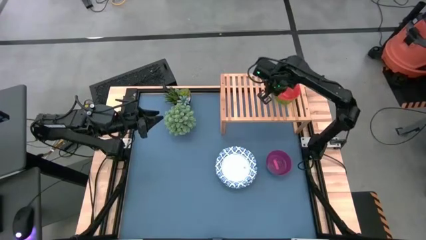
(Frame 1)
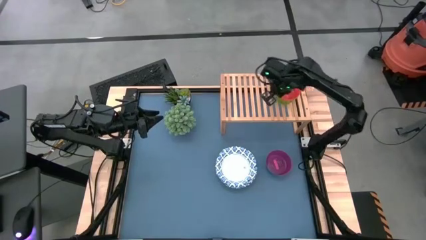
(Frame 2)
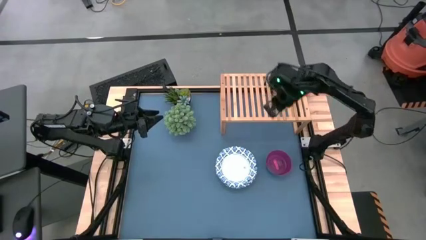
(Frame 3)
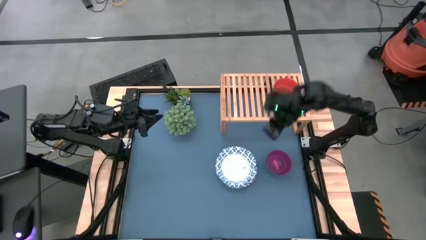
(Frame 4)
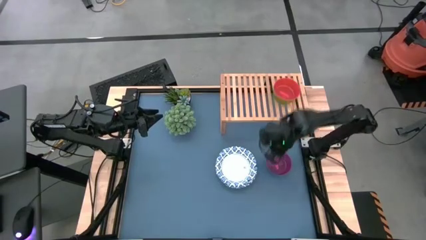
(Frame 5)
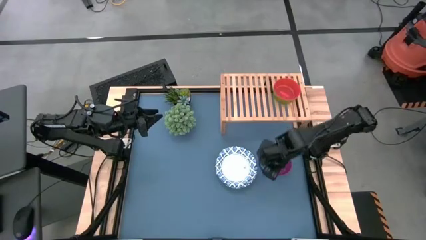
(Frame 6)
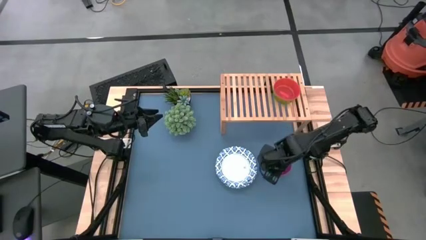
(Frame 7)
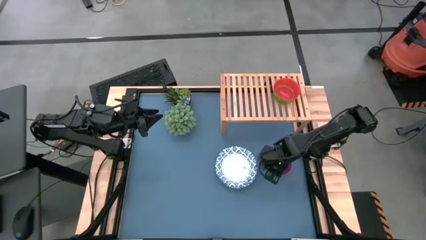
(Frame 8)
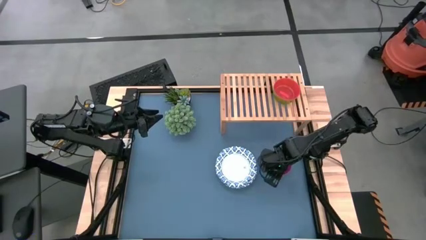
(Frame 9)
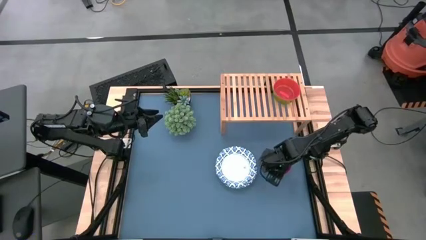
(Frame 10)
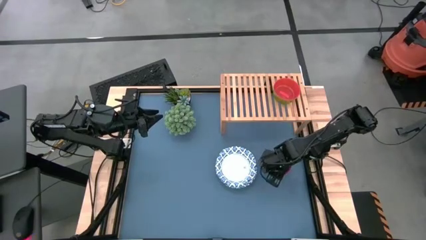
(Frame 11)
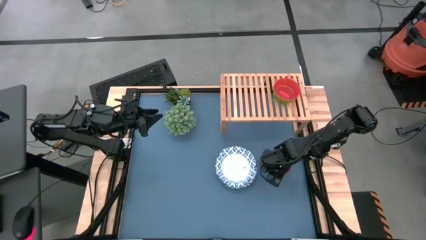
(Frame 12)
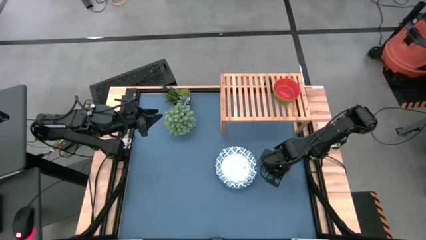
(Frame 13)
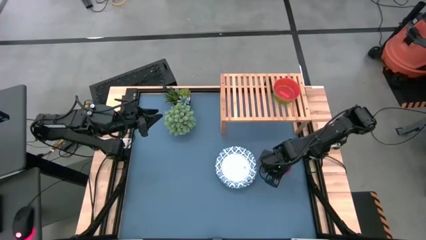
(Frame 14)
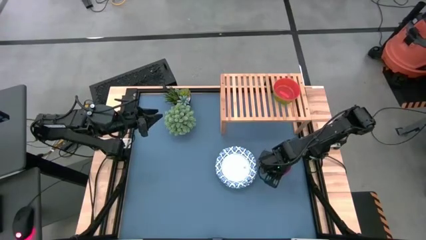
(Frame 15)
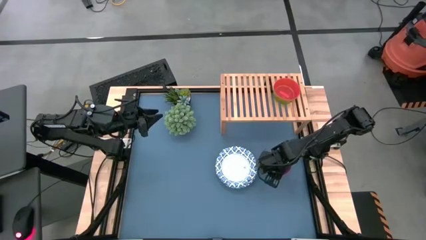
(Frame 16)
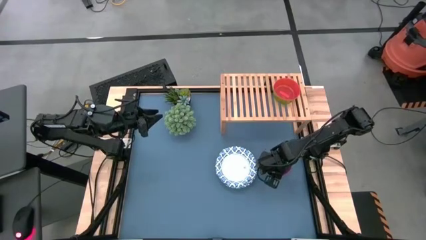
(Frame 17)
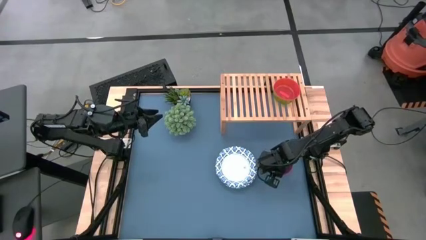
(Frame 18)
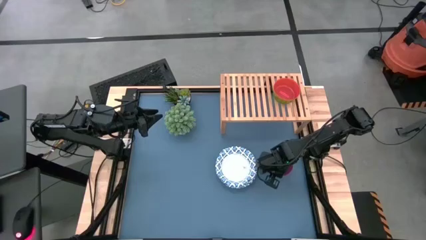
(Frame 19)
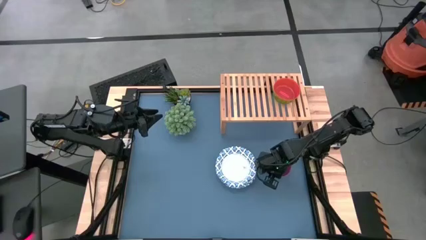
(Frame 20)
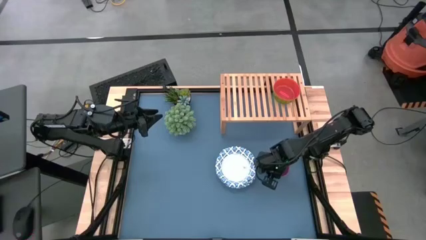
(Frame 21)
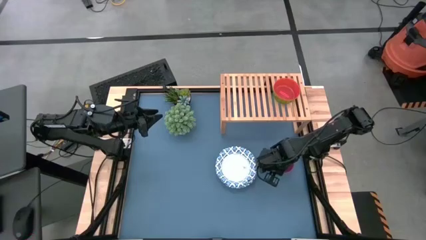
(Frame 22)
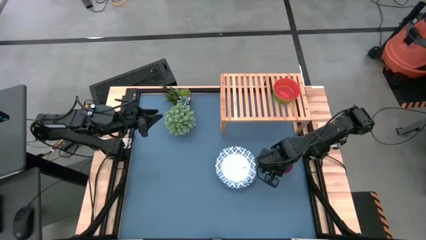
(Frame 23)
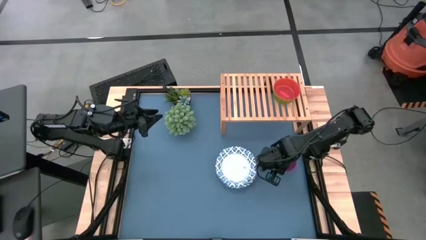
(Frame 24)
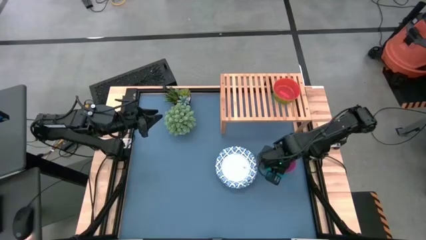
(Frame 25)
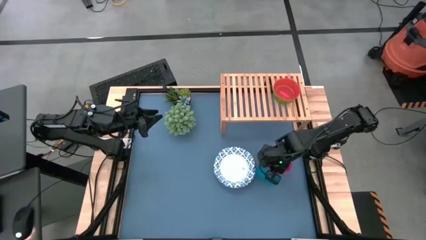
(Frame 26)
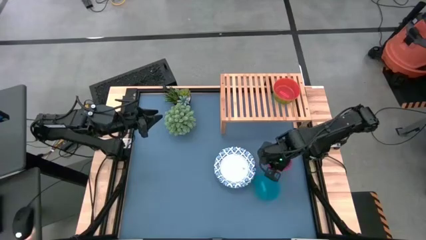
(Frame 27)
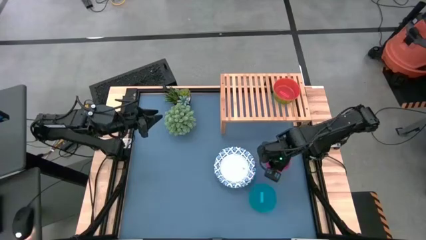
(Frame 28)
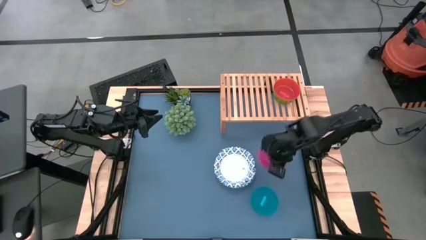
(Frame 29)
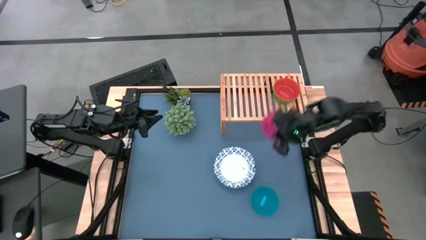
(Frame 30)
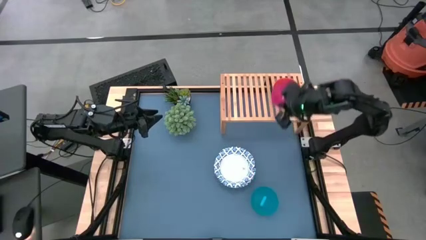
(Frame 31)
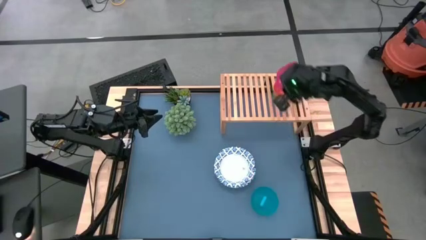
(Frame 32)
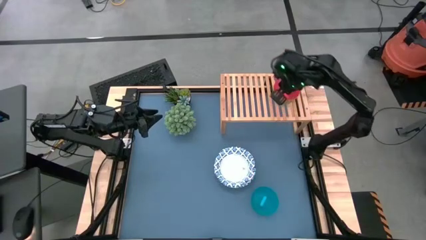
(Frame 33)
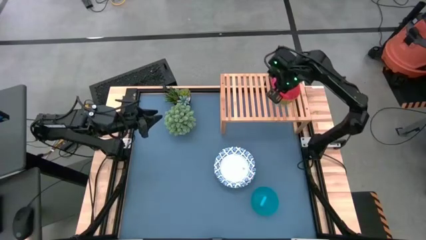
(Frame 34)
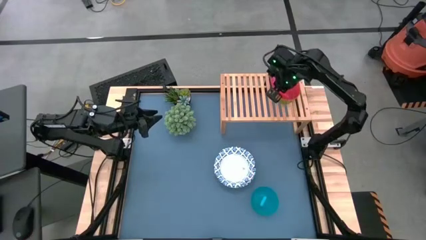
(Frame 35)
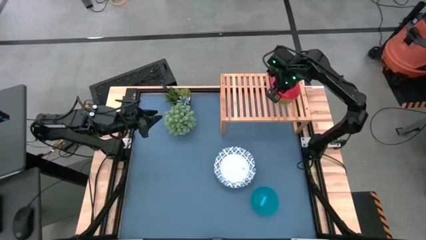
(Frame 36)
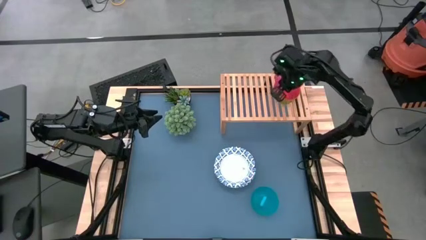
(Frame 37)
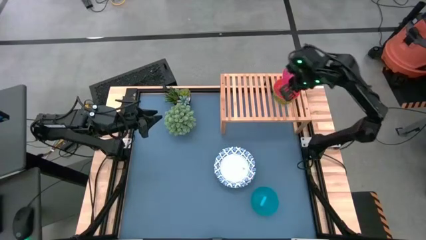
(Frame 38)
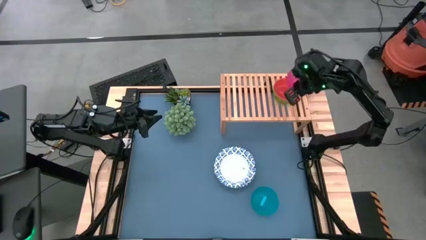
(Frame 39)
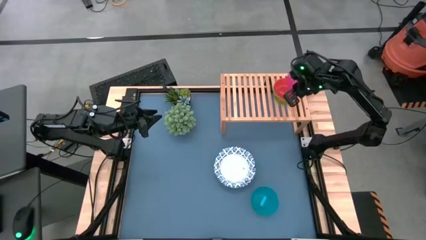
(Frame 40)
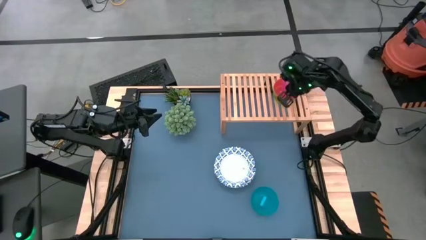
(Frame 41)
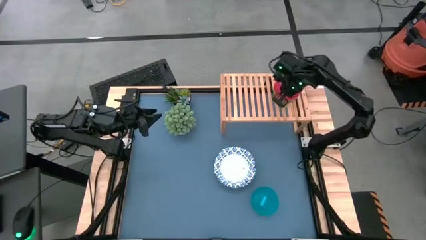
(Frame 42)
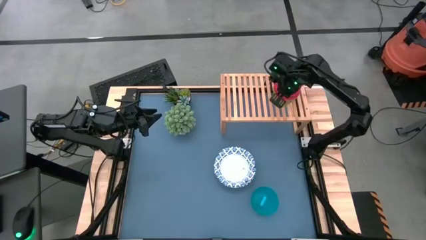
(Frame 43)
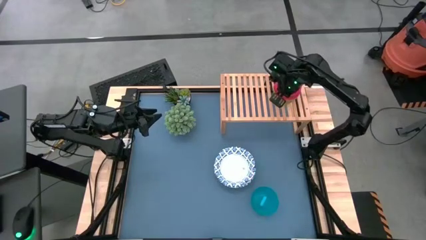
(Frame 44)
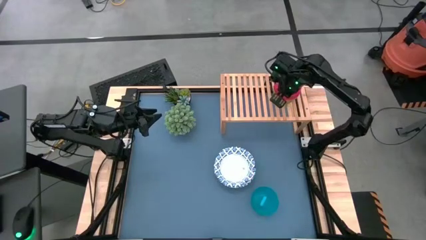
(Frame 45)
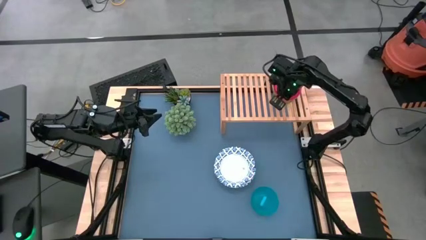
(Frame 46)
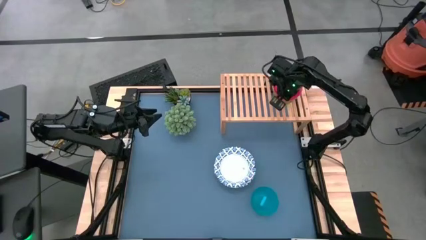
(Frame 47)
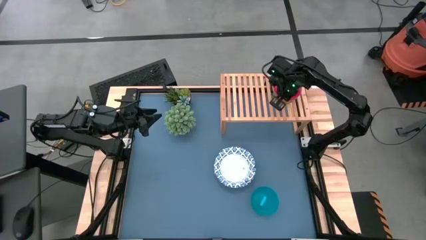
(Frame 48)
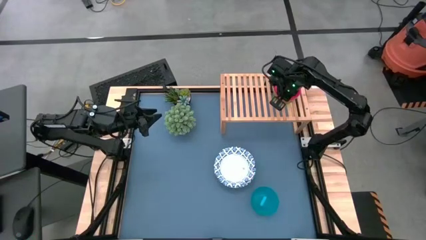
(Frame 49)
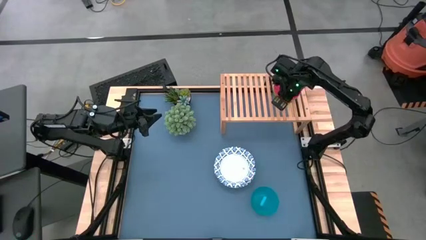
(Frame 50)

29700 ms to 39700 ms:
Task: Place and stack bowls onto a shelf
Stack the violet bowl on top of the red bowl on the shelf

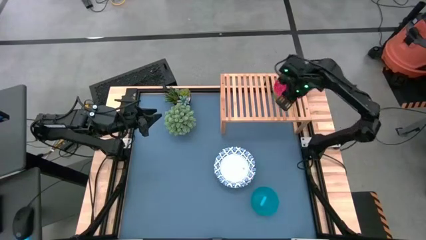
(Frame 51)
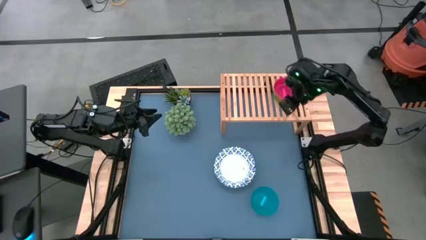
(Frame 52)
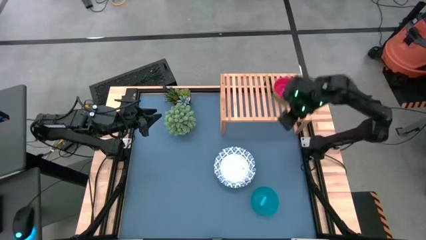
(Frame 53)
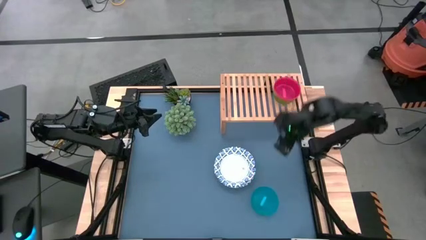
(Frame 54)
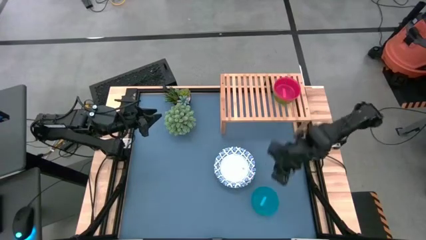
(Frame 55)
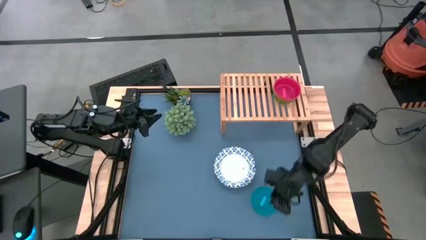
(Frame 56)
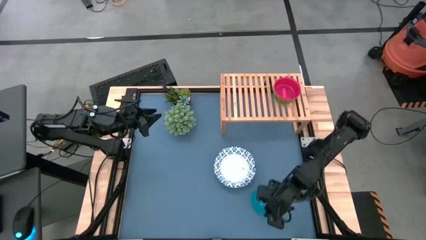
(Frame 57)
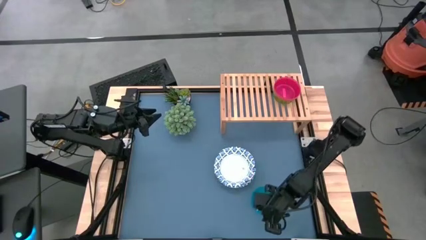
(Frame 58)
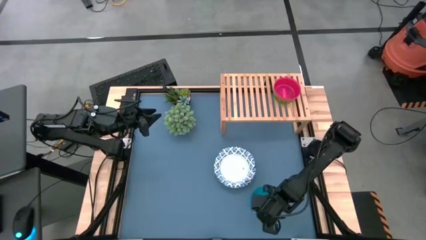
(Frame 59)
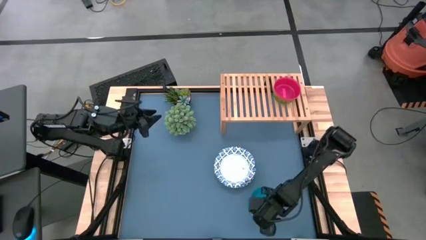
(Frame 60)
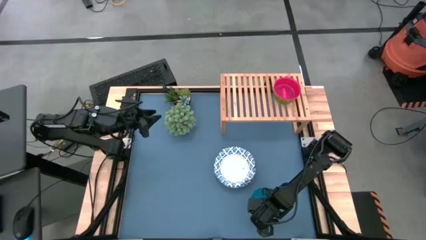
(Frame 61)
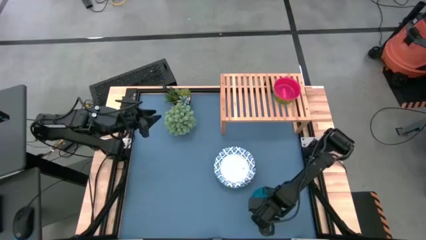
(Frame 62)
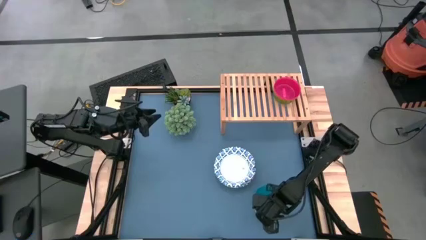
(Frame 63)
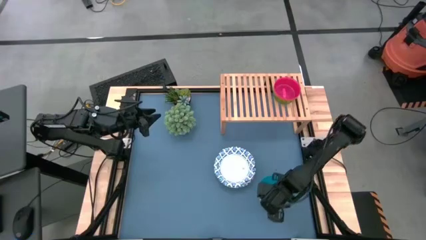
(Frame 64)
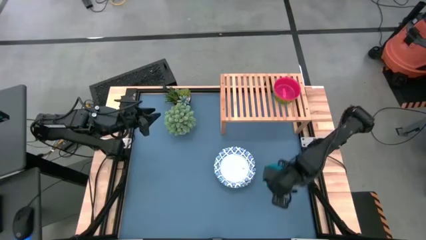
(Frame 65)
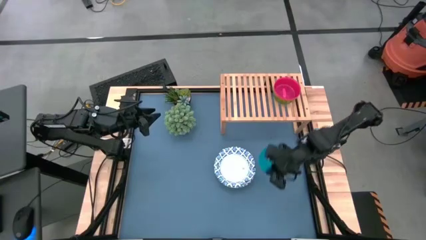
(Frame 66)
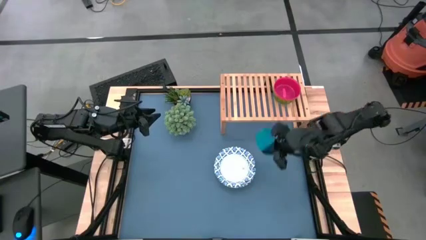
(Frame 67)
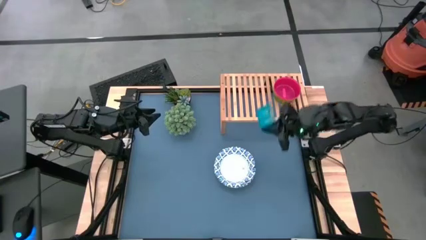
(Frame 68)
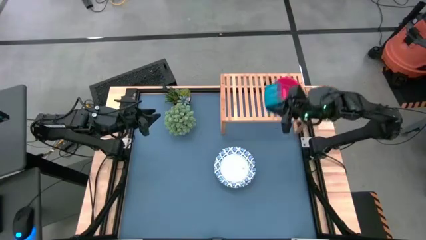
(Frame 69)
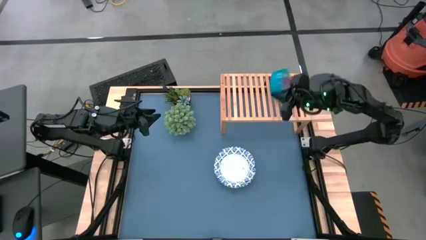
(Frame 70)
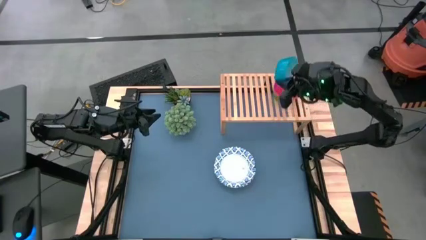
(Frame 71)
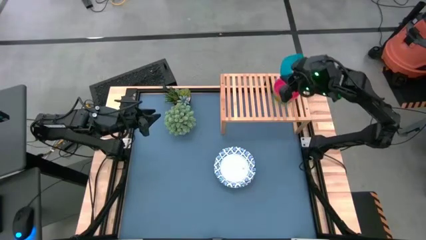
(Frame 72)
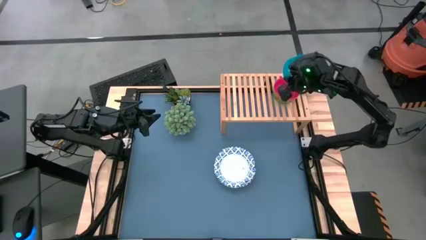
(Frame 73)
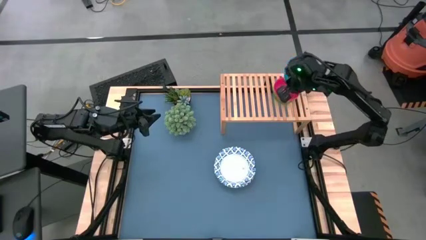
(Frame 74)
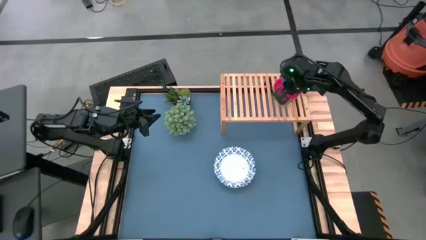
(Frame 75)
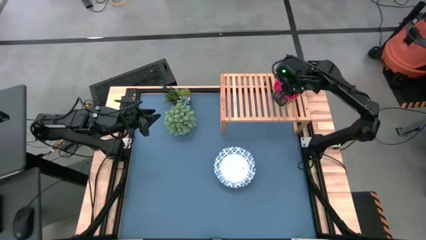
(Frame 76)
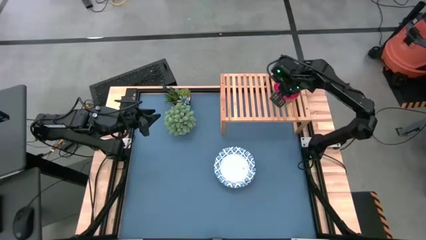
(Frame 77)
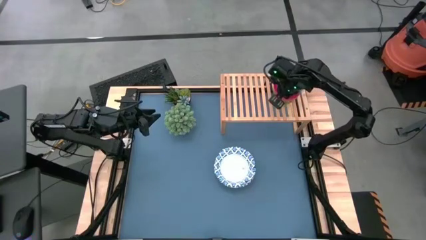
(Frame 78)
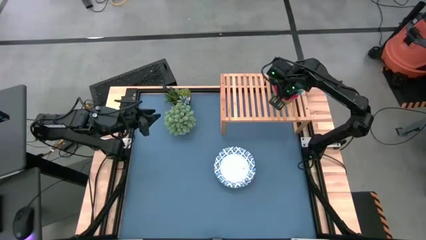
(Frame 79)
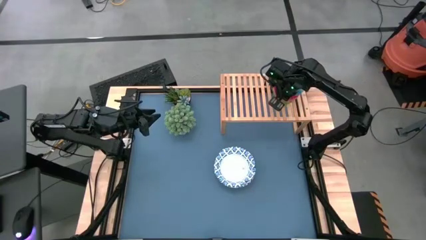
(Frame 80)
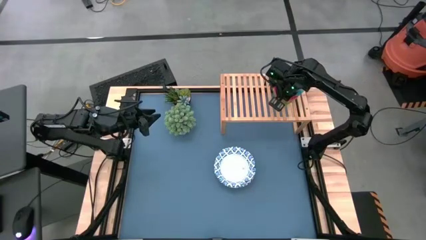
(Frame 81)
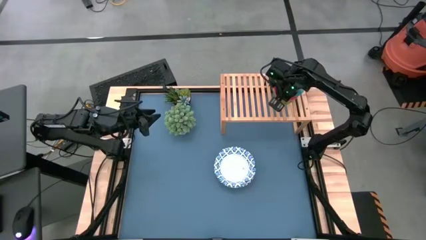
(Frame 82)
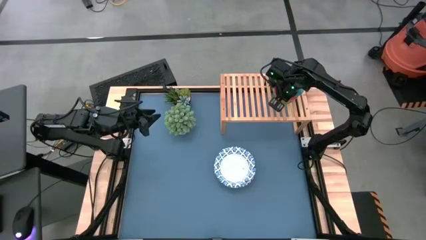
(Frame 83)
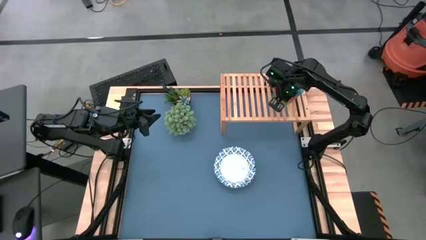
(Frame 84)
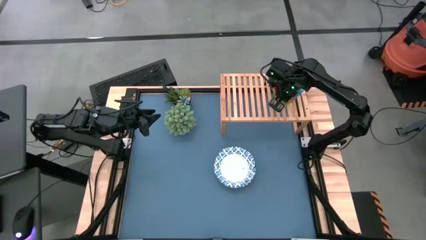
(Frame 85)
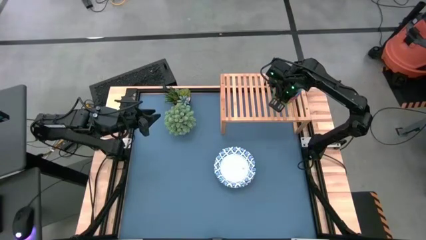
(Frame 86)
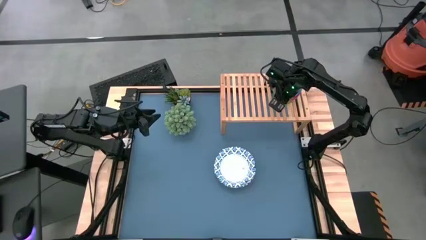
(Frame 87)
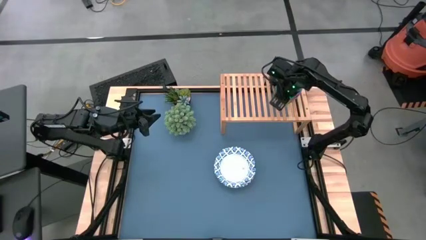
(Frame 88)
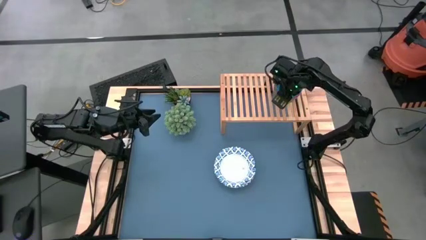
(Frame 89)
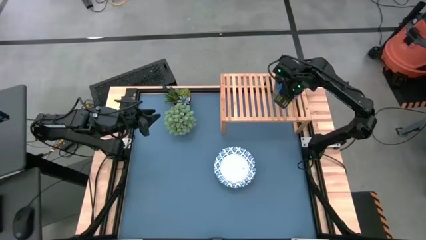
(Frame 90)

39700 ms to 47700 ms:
Stack the blue bowl on top of the violet bowl on the shelf
